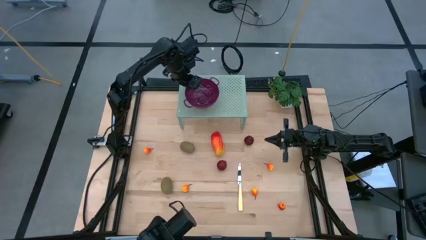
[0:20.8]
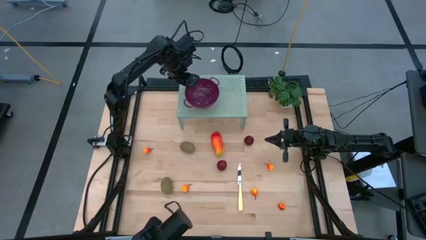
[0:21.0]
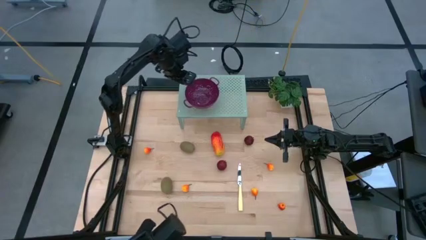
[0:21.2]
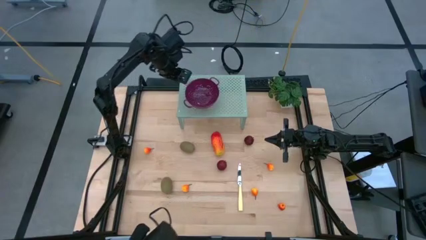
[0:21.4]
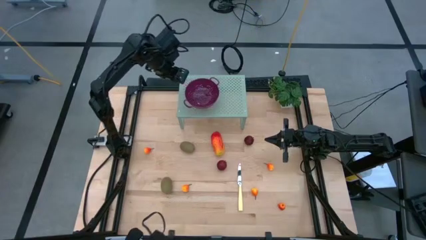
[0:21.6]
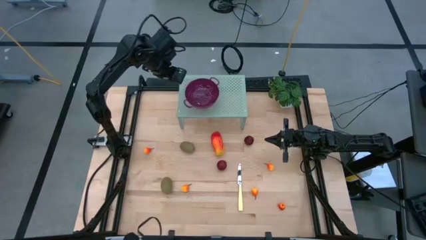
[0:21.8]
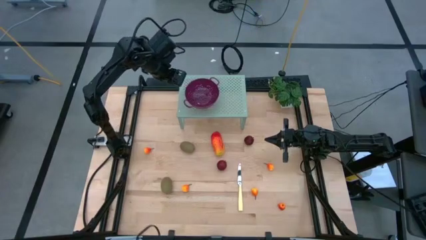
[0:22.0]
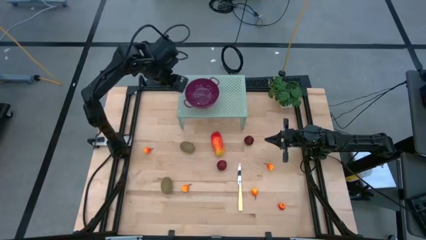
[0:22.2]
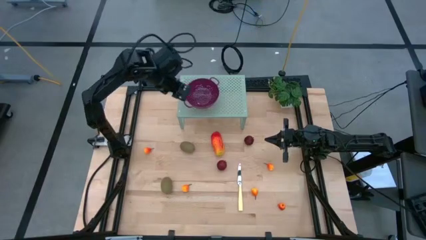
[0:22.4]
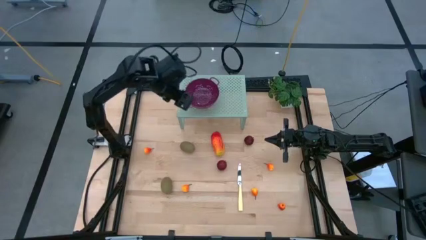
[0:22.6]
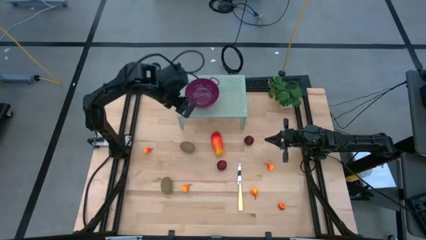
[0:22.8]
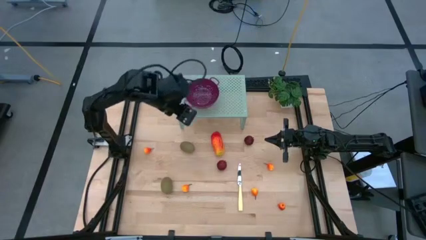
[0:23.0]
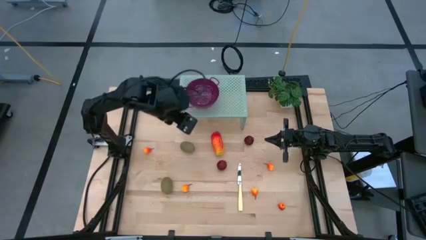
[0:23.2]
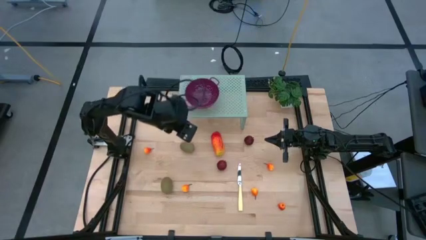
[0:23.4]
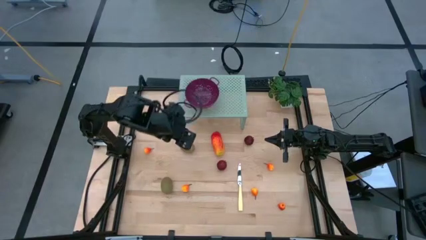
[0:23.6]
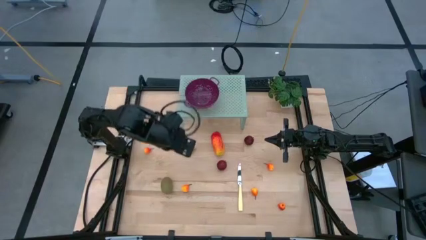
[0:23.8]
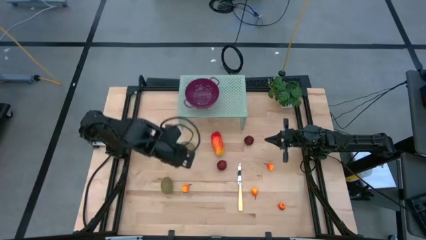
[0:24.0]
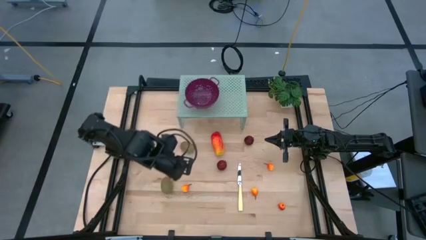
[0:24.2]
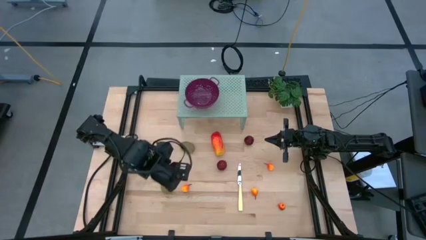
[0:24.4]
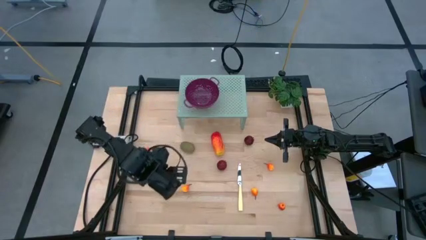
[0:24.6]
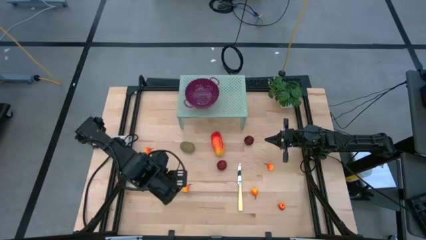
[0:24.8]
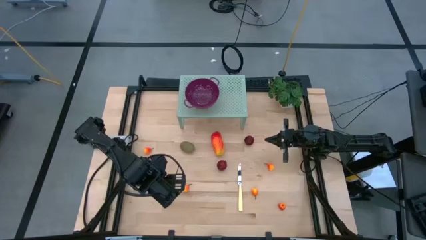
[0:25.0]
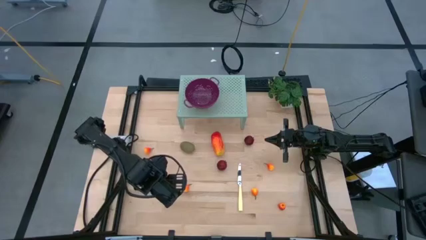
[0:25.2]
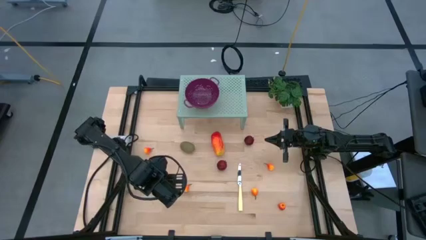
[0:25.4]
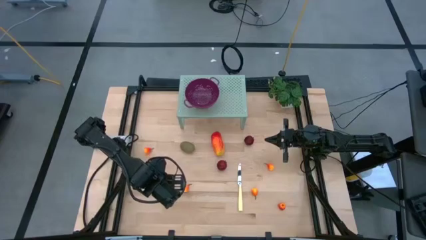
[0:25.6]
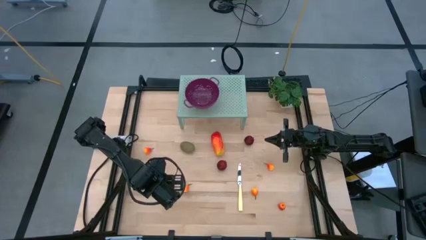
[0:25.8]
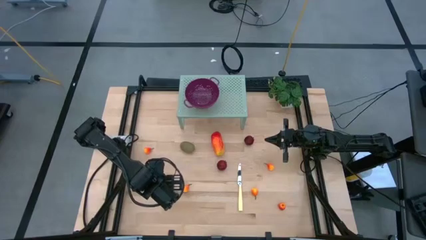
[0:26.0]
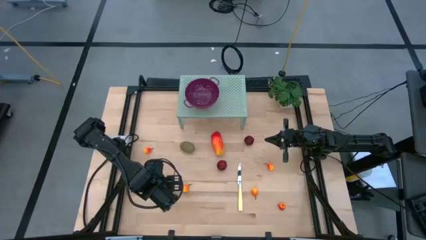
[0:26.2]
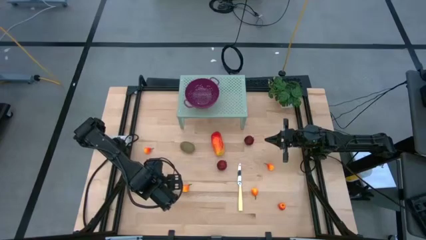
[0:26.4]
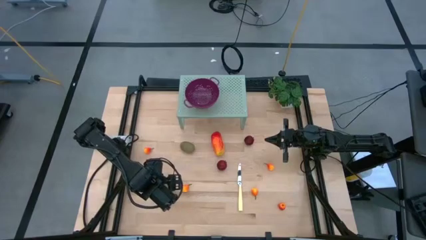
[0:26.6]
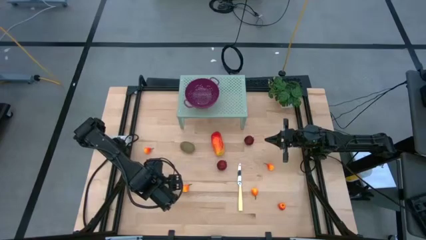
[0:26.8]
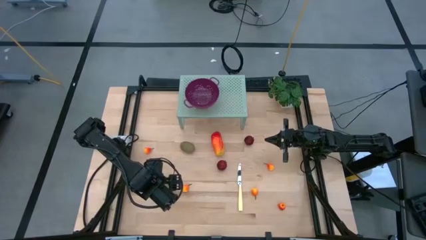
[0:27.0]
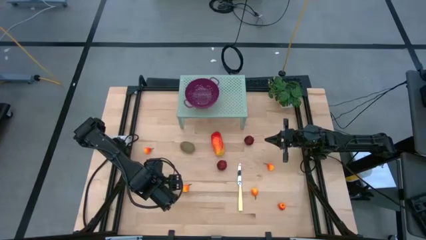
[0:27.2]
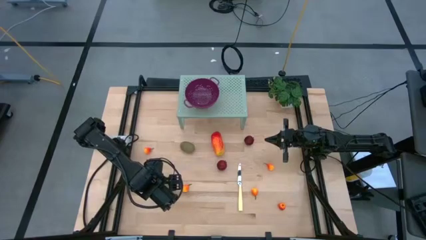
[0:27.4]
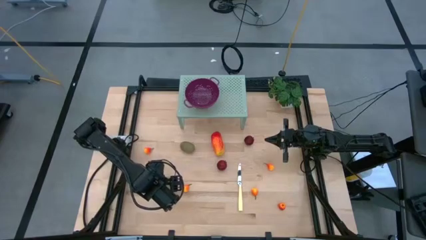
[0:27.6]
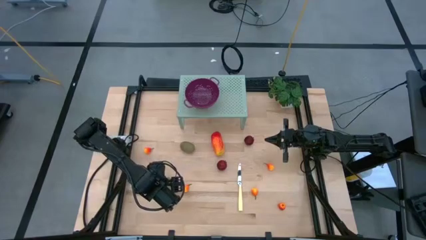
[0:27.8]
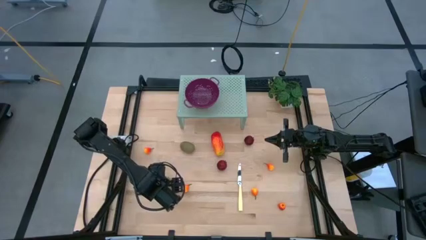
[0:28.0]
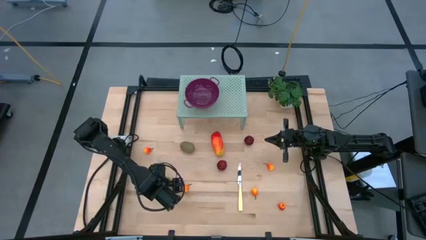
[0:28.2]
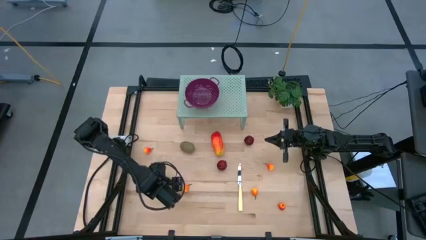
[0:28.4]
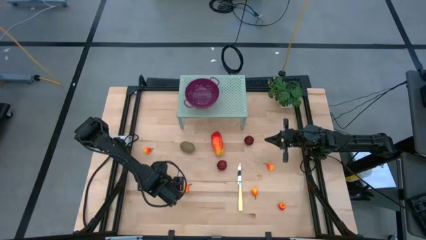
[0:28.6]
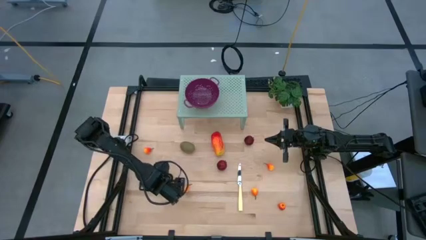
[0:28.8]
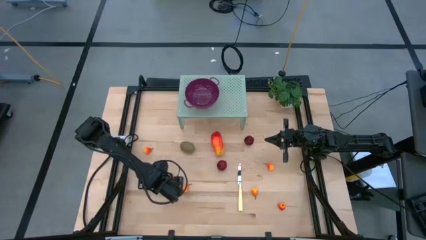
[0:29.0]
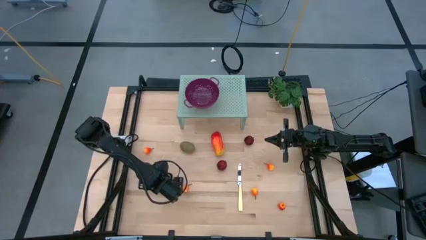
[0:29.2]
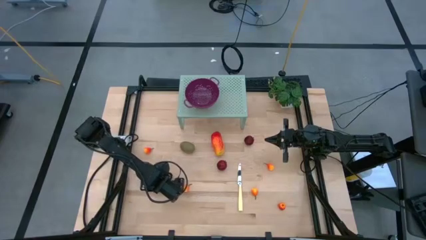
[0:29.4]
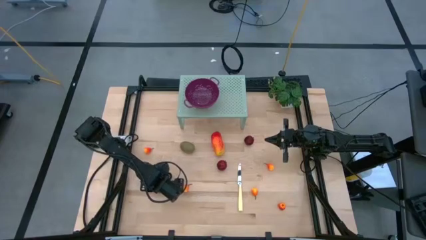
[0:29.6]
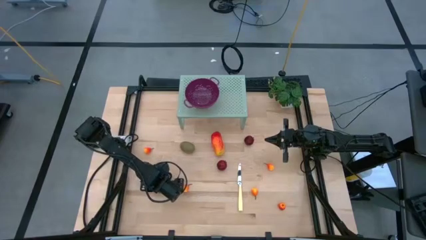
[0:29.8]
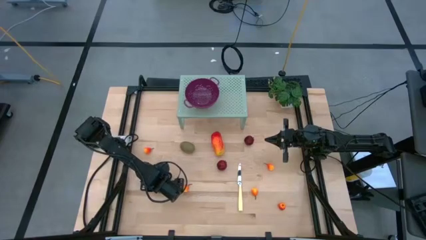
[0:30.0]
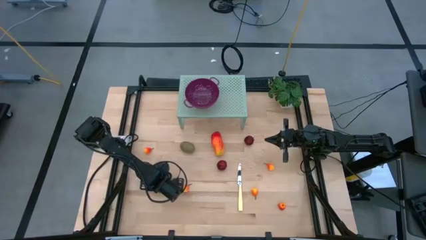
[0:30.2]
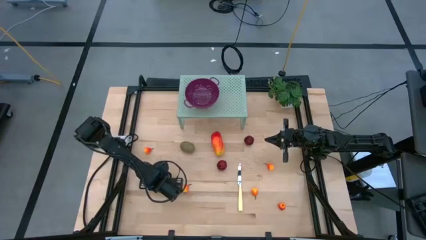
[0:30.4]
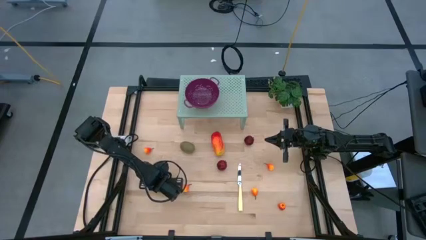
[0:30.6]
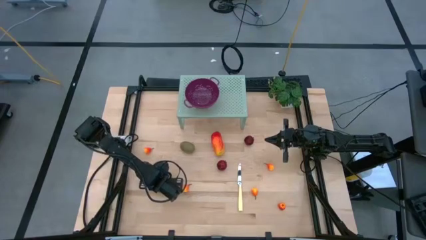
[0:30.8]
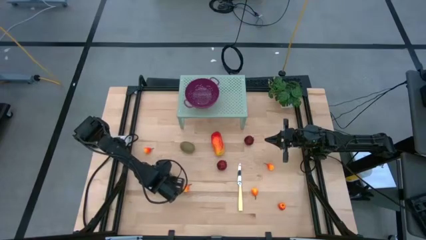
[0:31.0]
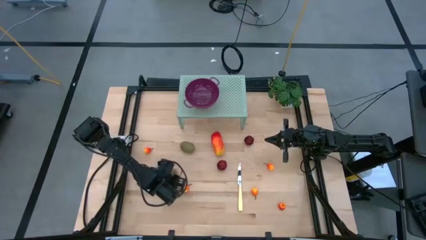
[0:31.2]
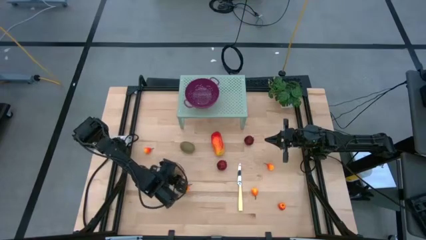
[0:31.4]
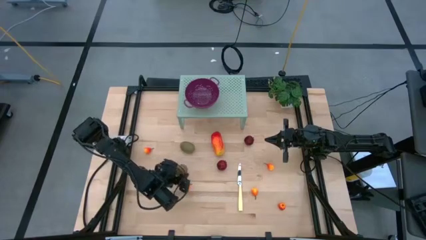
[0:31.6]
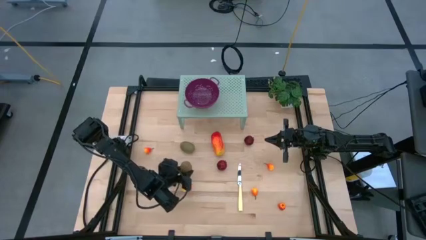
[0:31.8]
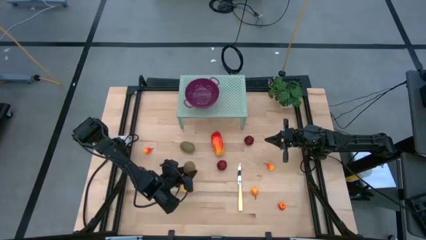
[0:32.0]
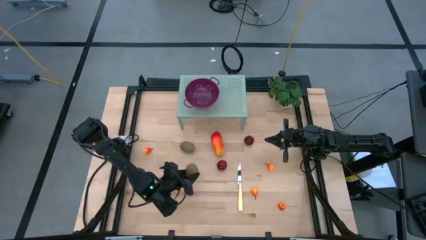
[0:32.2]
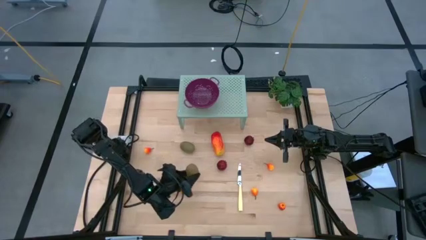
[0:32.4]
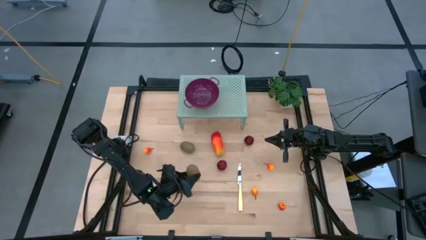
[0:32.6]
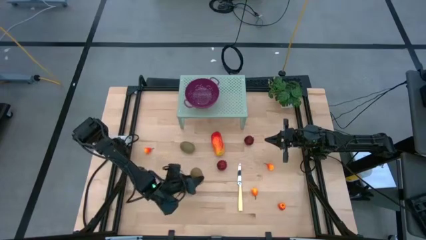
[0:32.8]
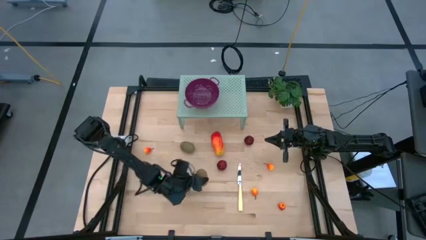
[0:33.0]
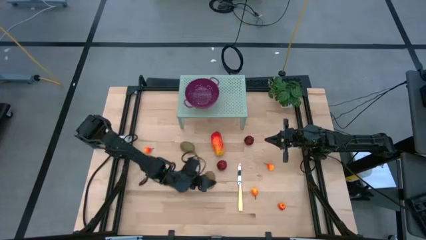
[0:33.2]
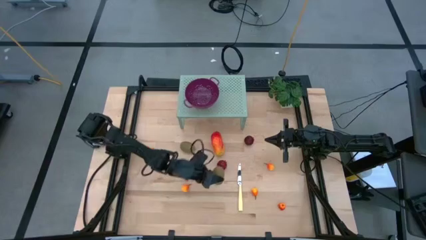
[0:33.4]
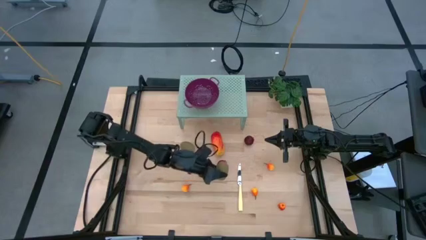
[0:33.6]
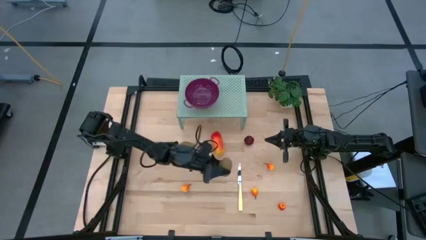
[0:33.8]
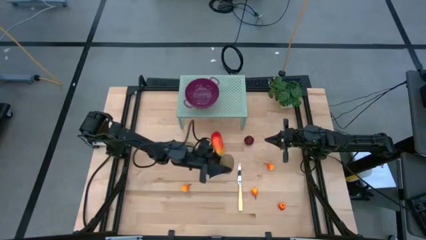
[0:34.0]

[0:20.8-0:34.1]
Task: Pick & Place Fruit
Put the kiwi into violet strainer bowl on the shelf
